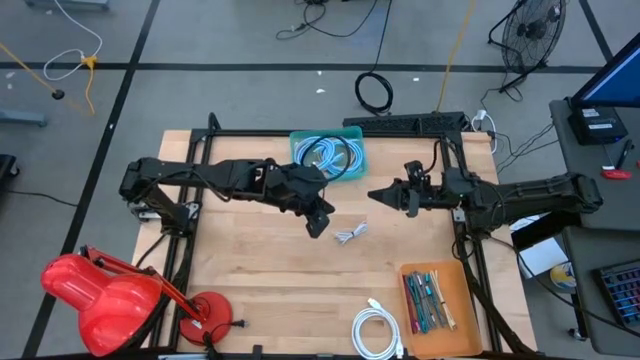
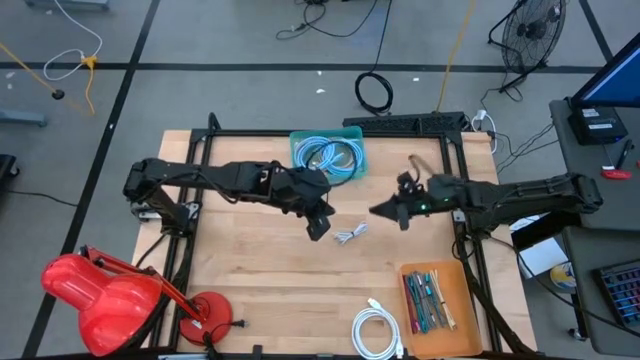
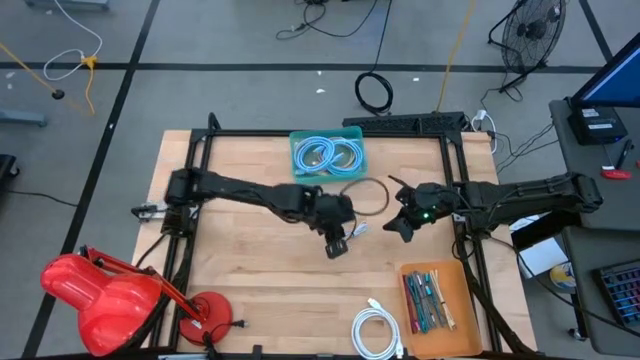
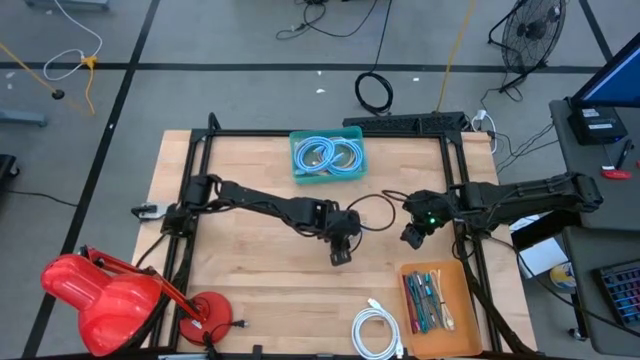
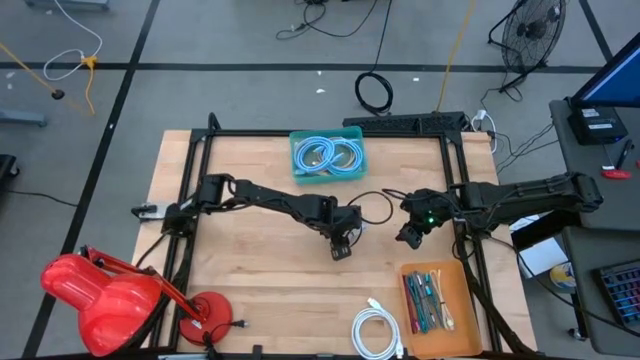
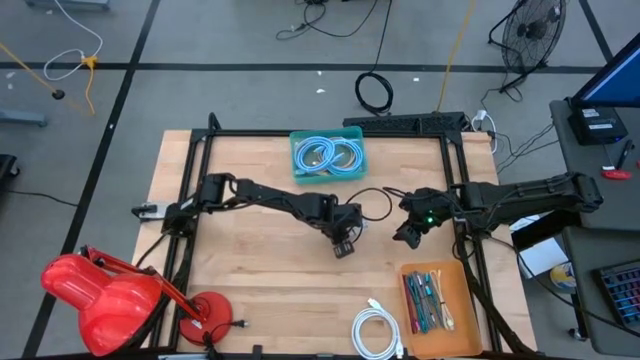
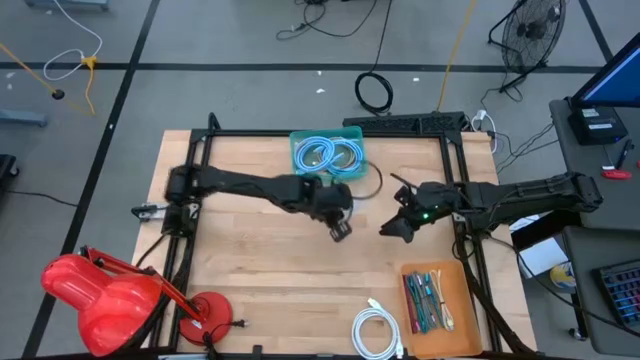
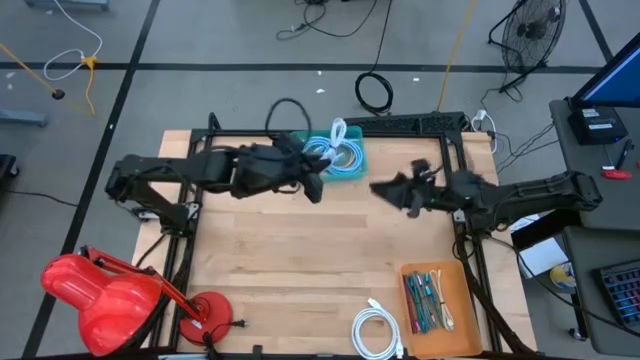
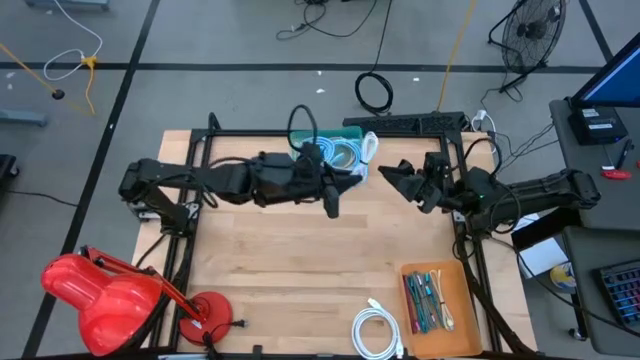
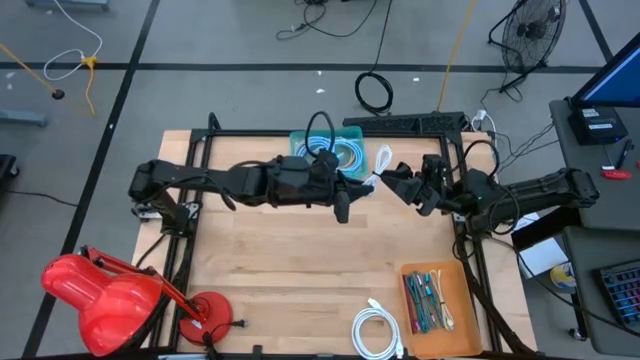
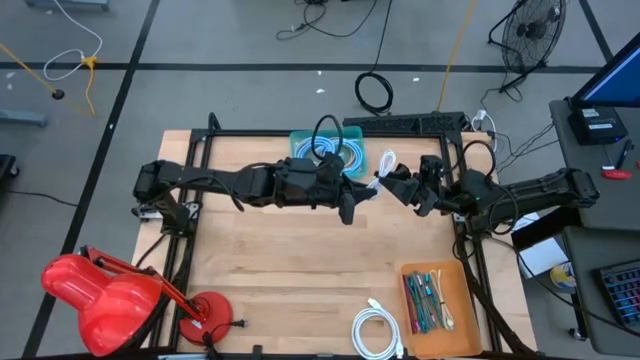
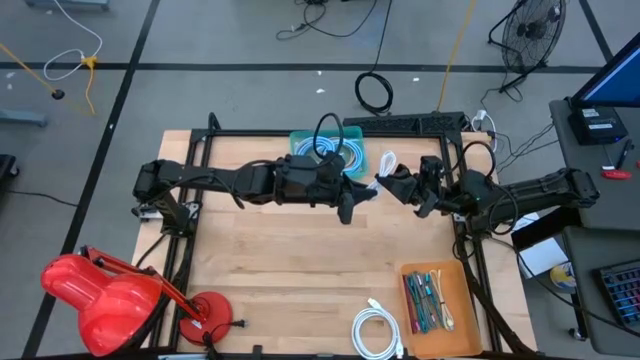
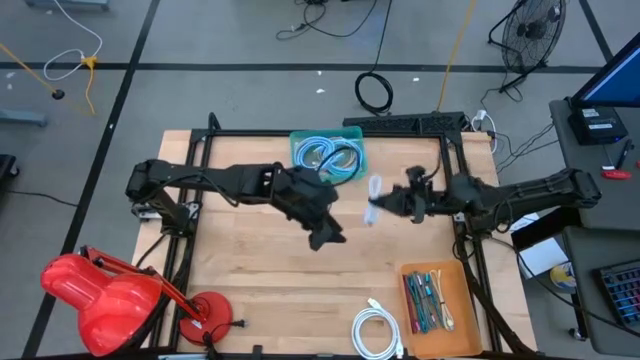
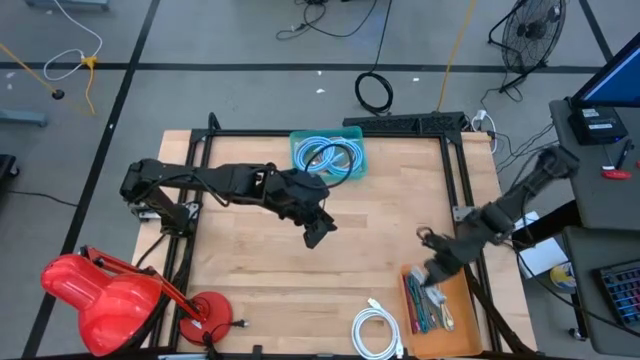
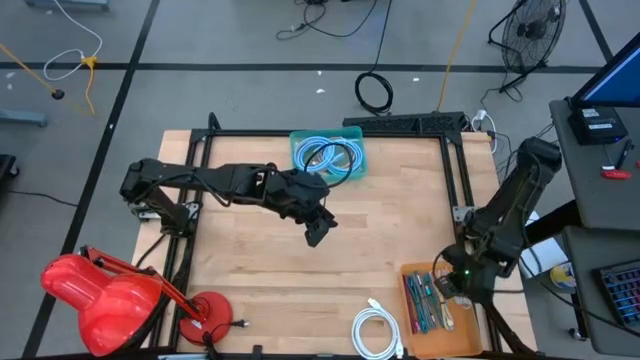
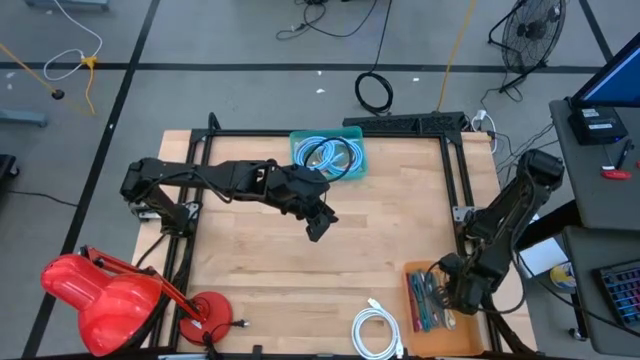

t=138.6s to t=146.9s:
Task: Pick & Place USB Port
Put the white charger cable into the orange bin

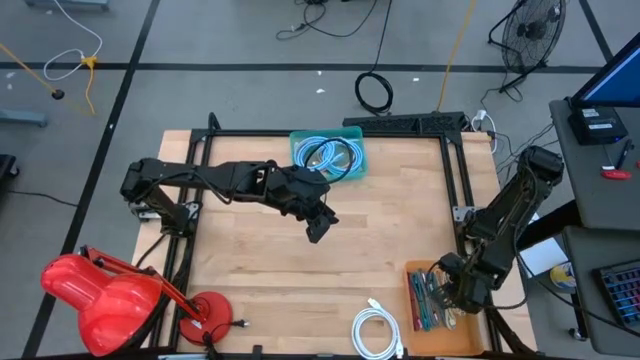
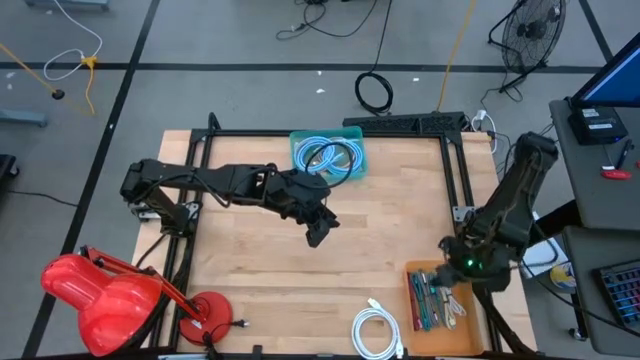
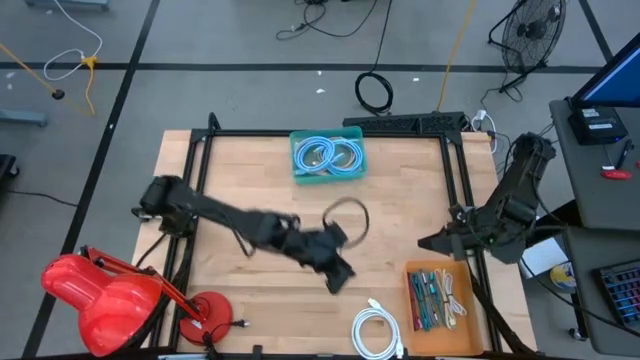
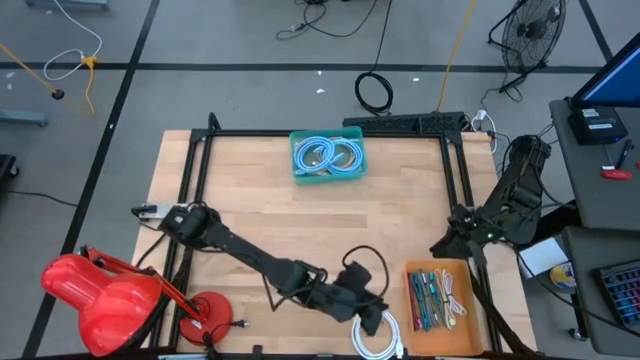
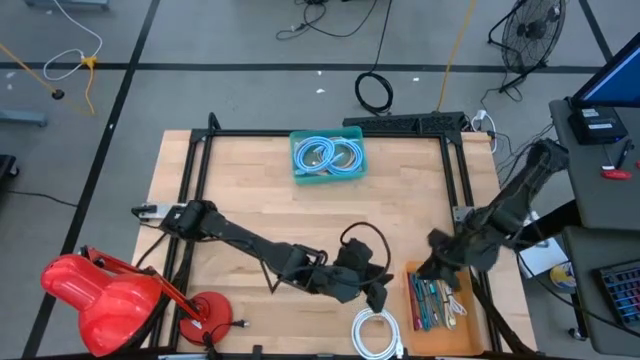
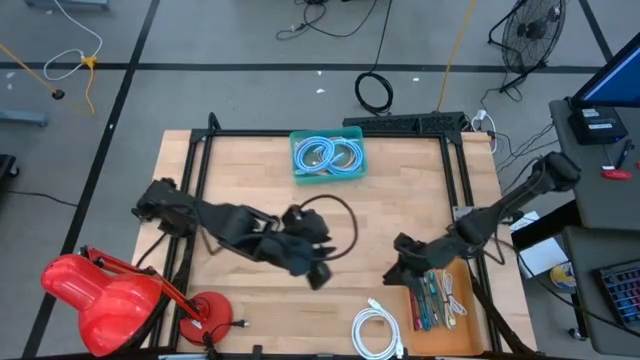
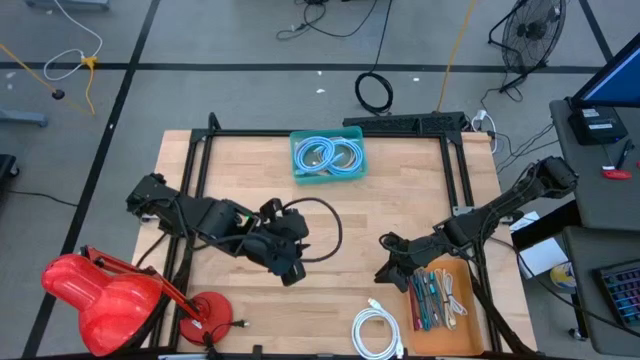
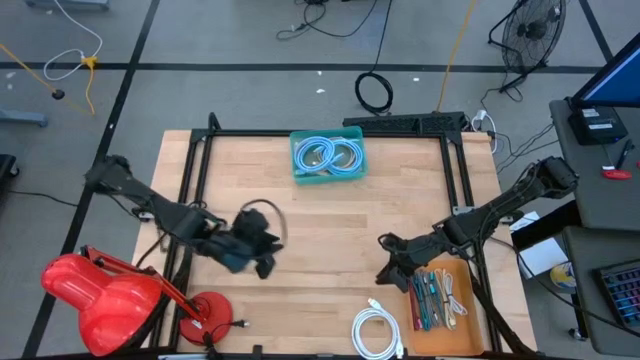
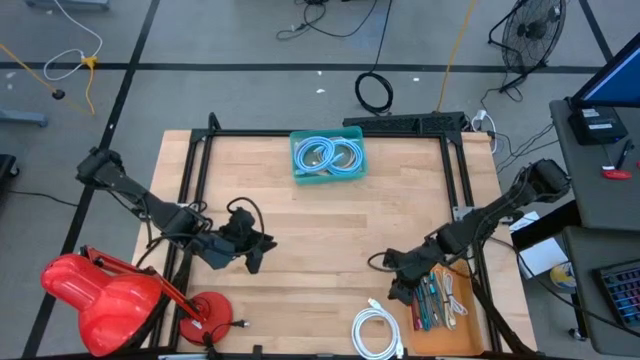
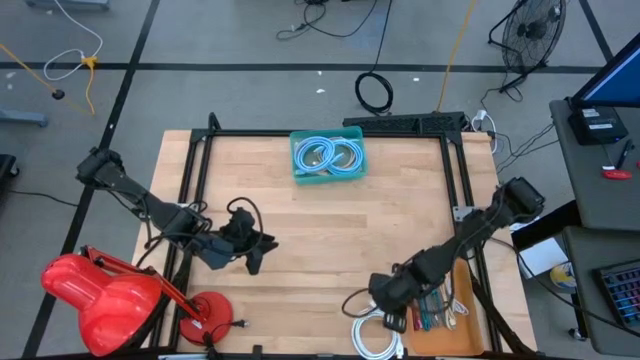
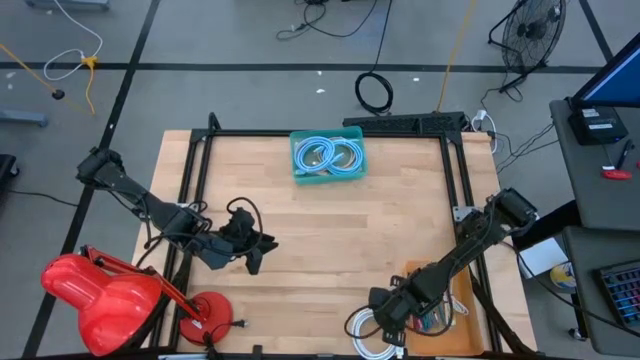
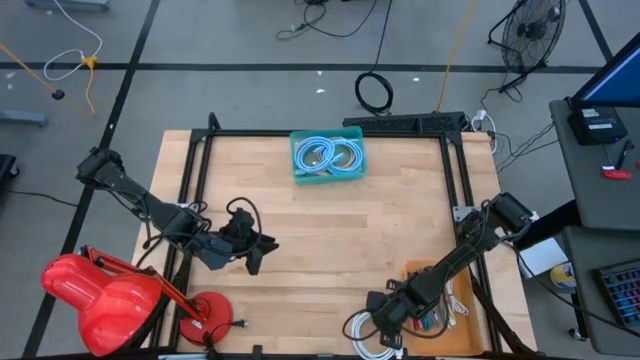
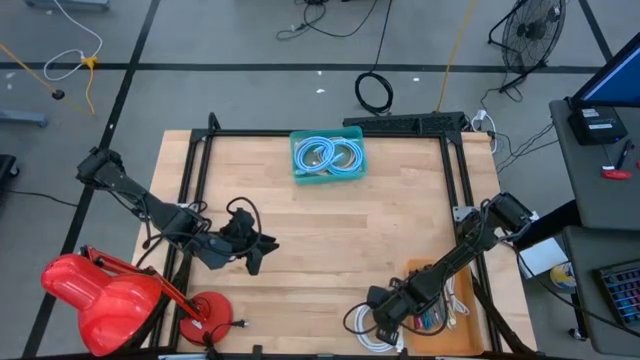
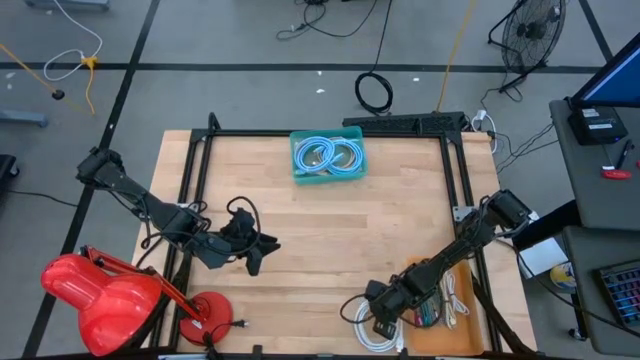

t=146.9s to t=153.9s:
Put the white display cable into the blue bin

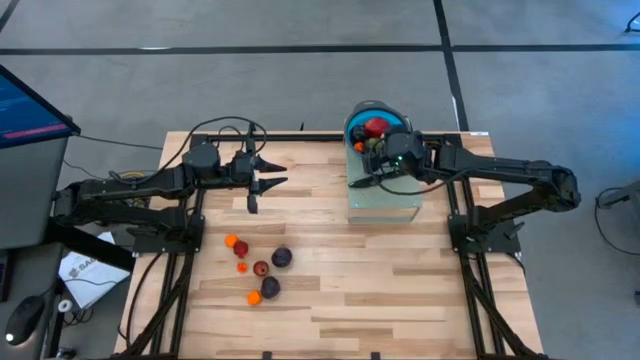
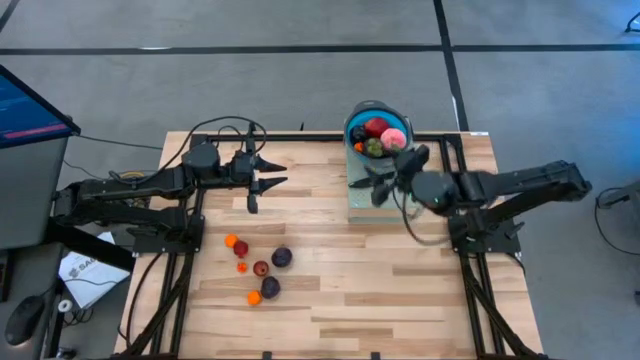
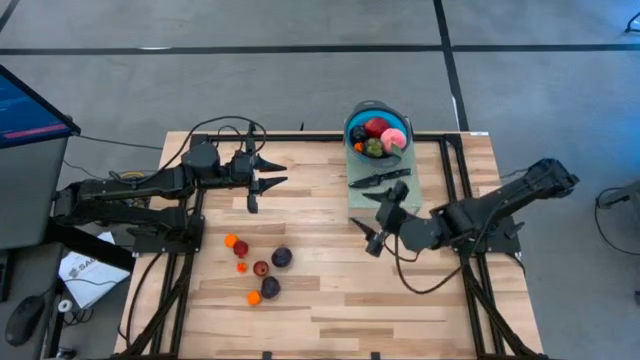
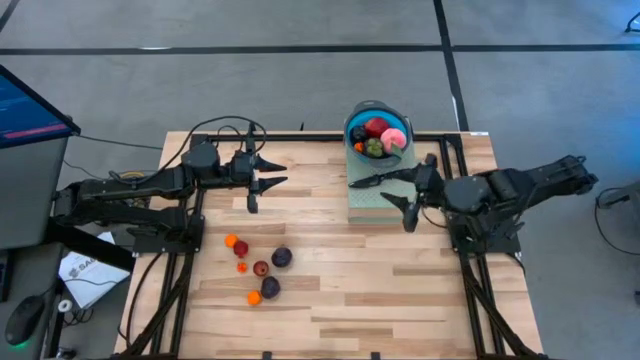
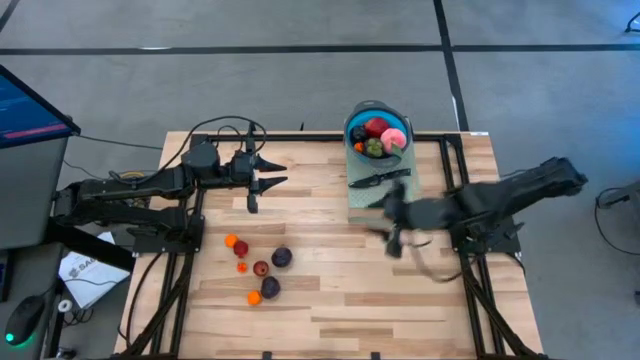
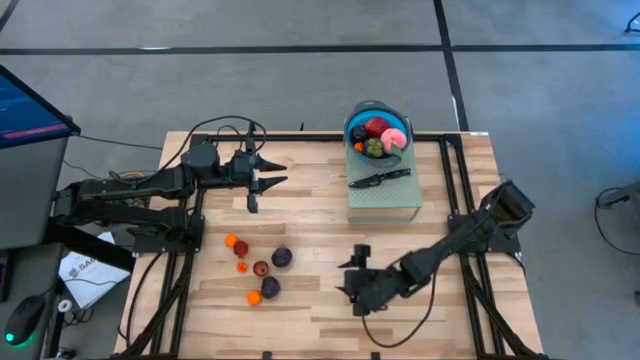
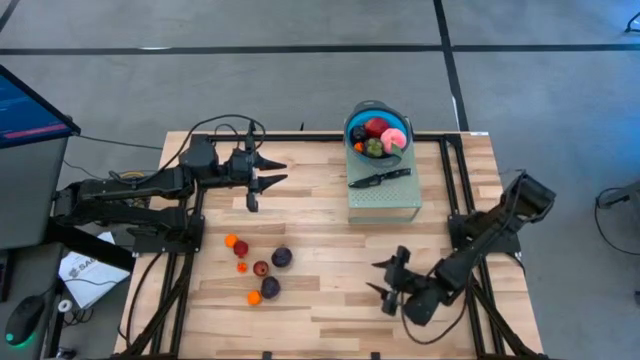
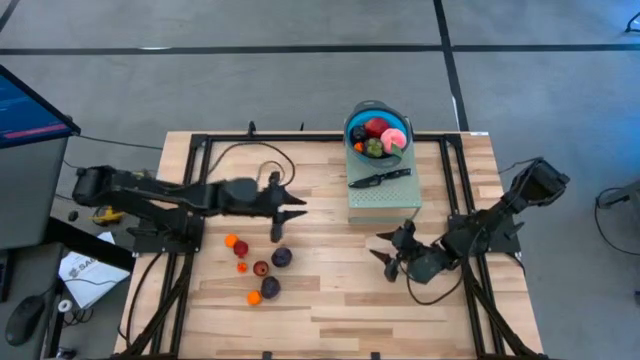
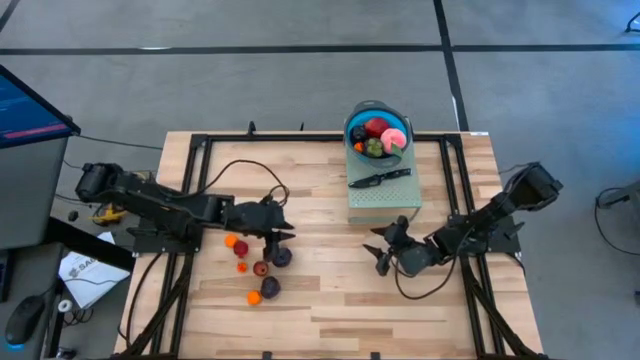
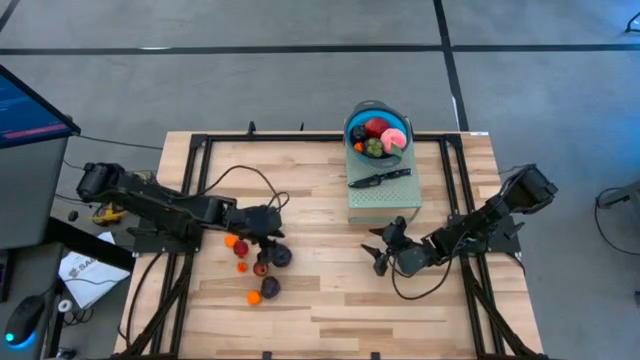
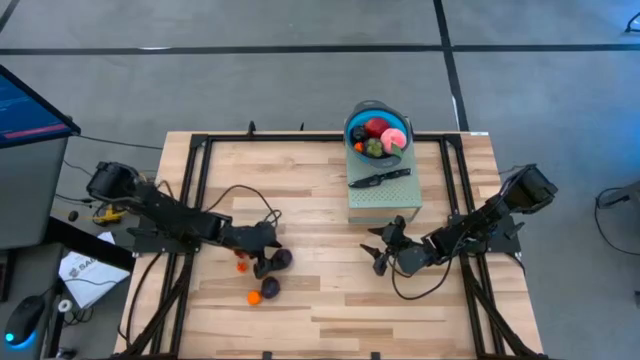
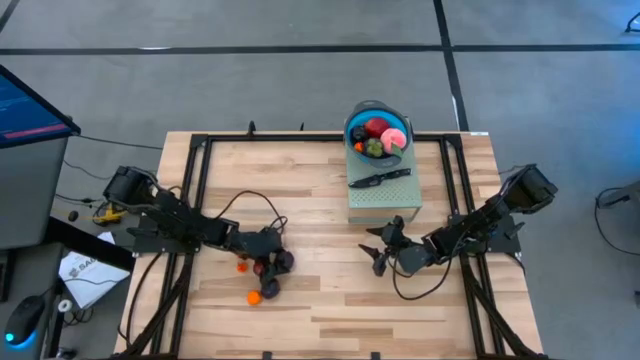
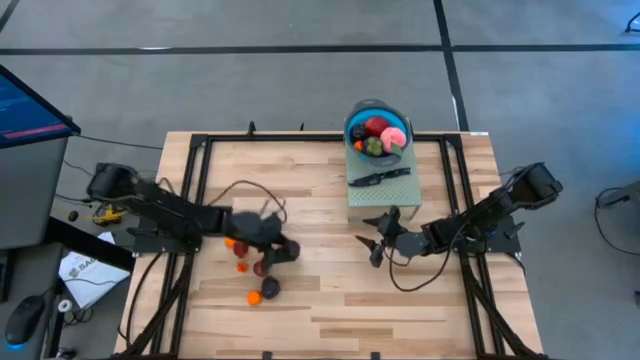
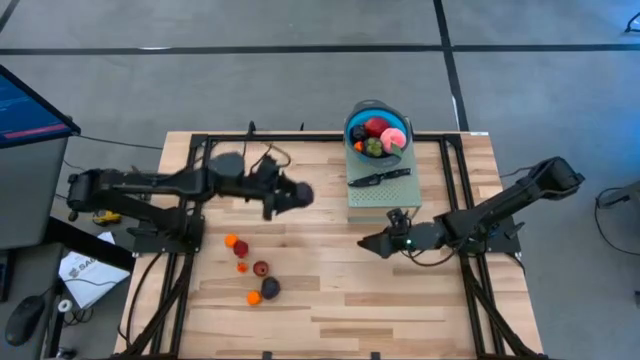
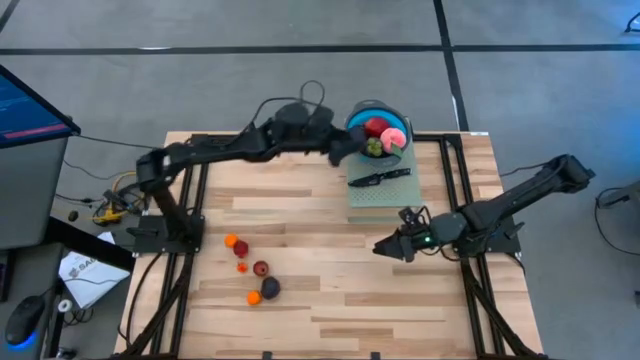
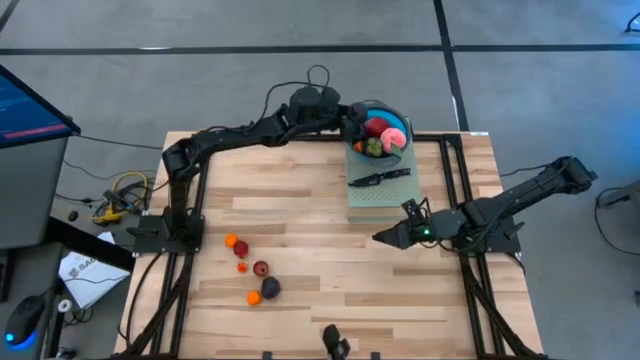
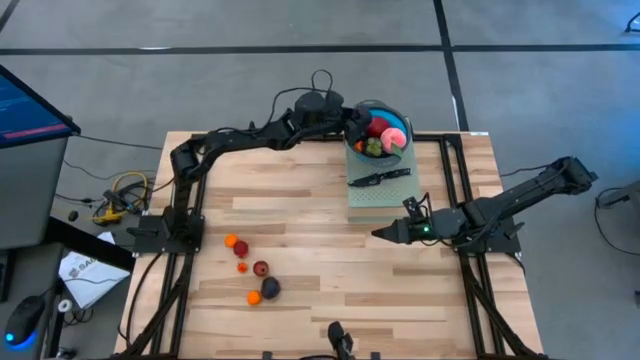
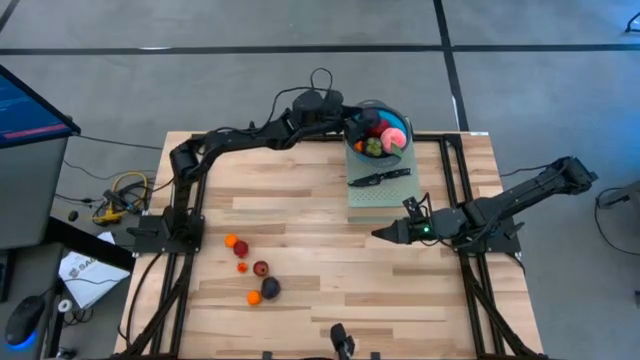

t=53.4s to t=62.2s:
Task: Pick & Place Fruit
Put the top violet plum into the blue strainer bowl on the shelf
